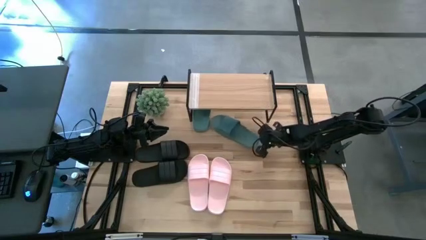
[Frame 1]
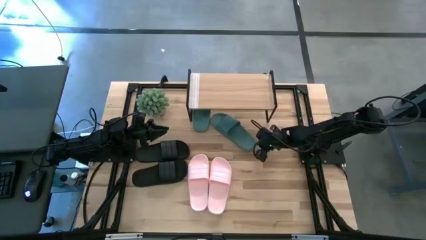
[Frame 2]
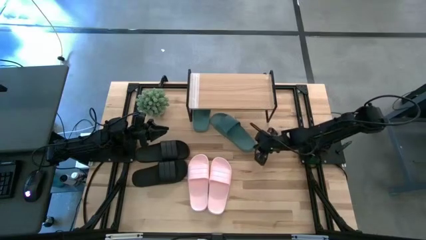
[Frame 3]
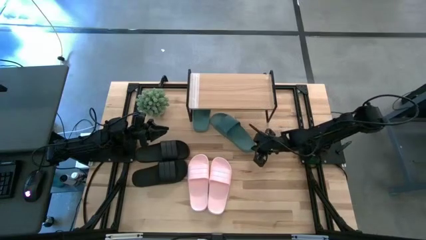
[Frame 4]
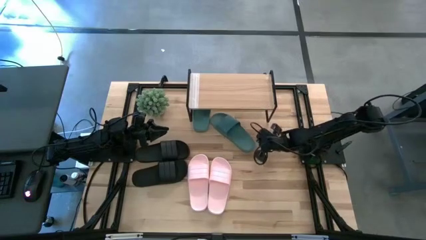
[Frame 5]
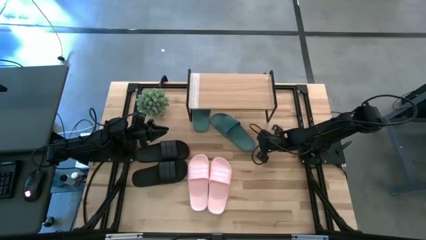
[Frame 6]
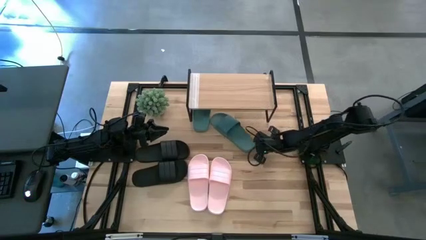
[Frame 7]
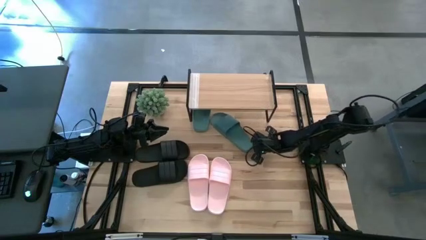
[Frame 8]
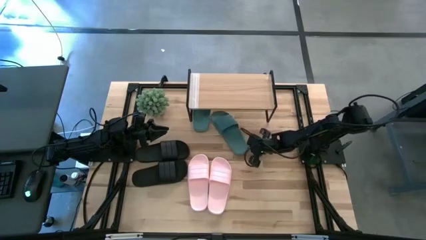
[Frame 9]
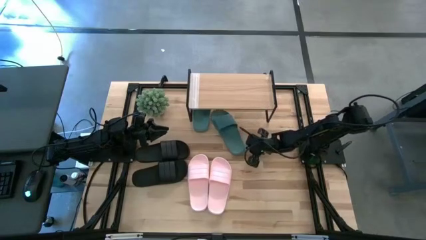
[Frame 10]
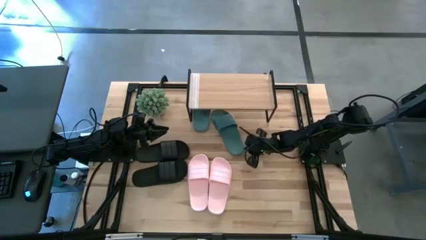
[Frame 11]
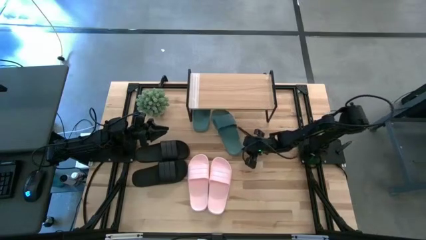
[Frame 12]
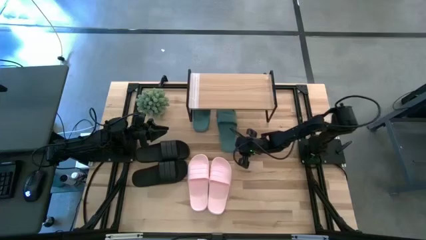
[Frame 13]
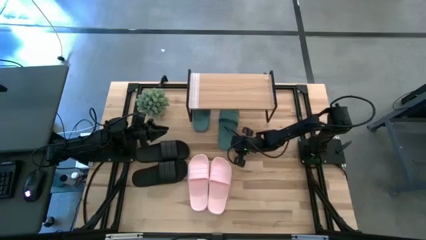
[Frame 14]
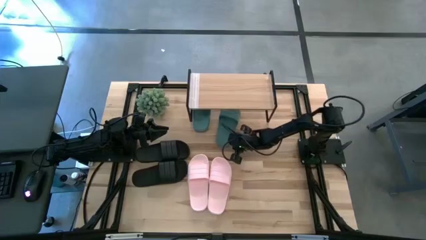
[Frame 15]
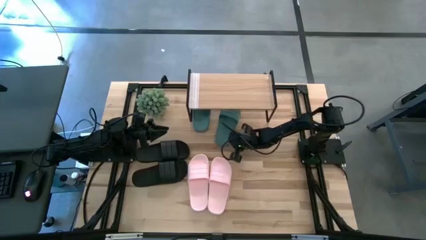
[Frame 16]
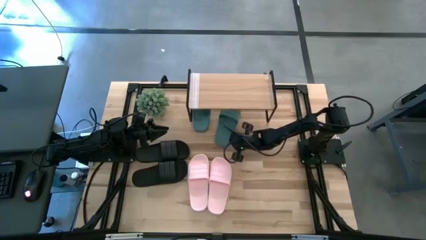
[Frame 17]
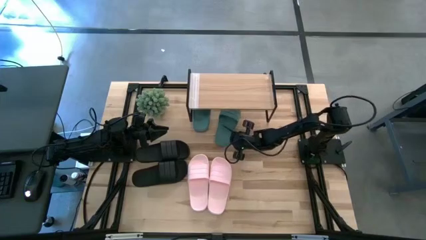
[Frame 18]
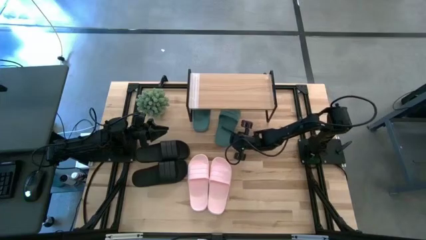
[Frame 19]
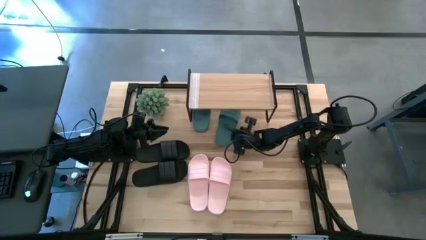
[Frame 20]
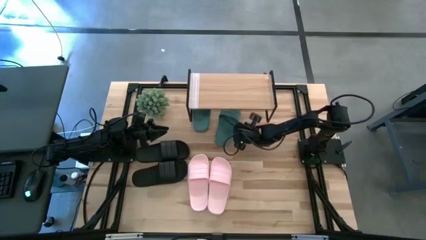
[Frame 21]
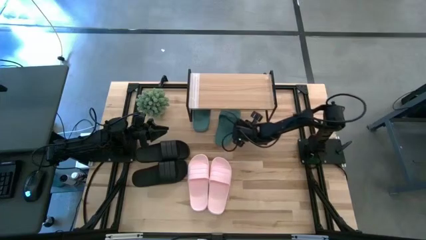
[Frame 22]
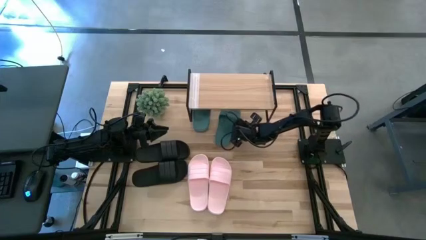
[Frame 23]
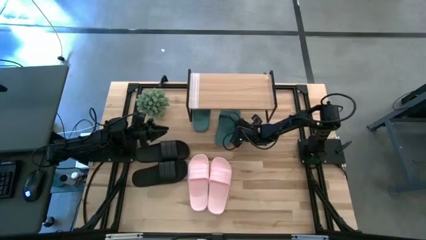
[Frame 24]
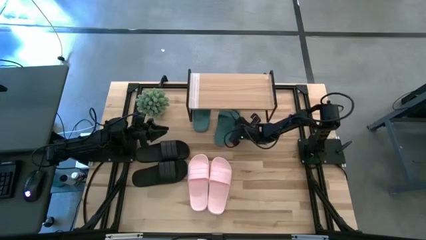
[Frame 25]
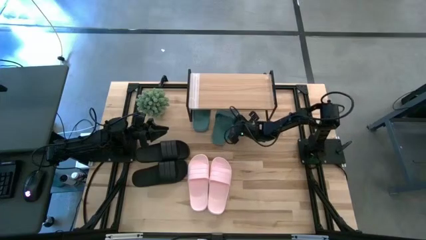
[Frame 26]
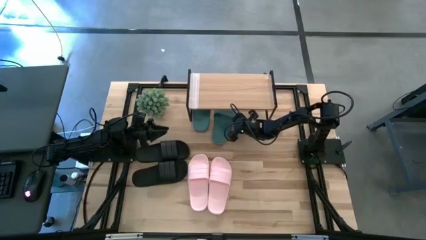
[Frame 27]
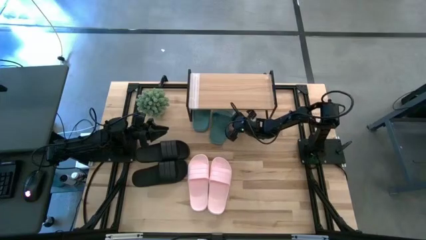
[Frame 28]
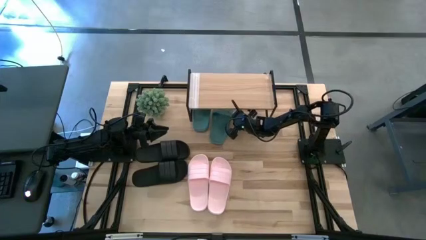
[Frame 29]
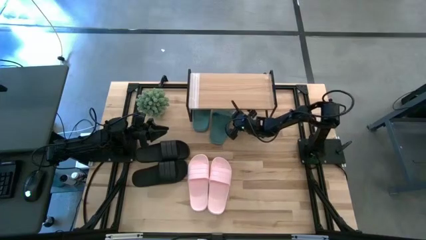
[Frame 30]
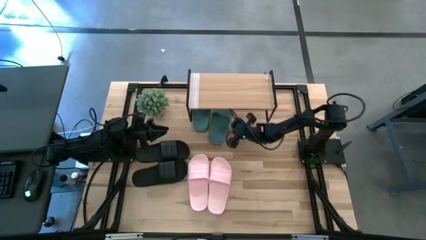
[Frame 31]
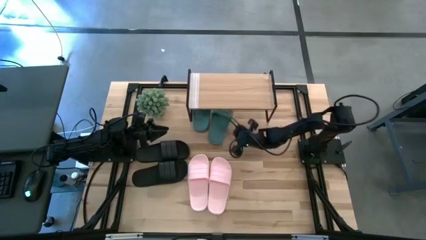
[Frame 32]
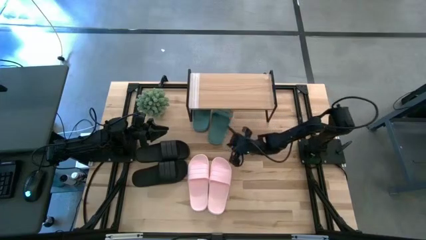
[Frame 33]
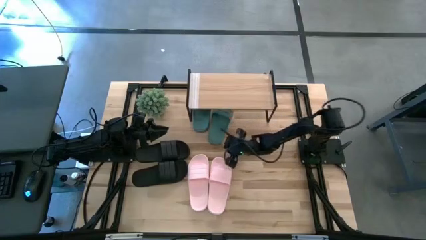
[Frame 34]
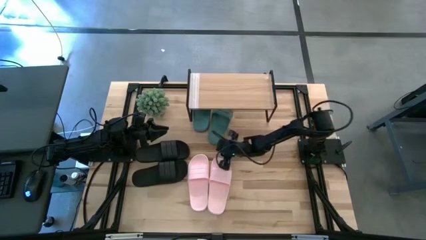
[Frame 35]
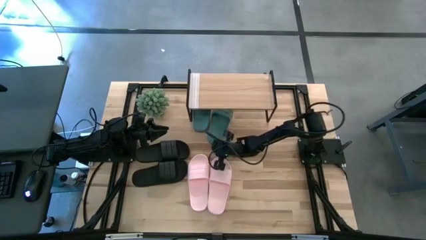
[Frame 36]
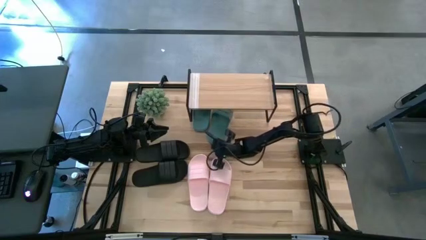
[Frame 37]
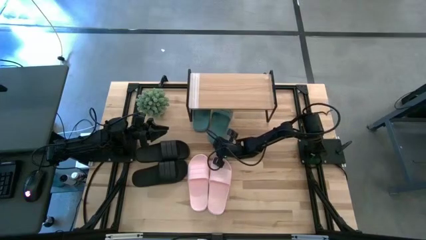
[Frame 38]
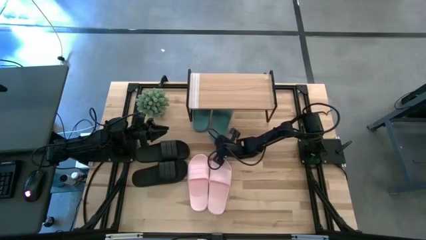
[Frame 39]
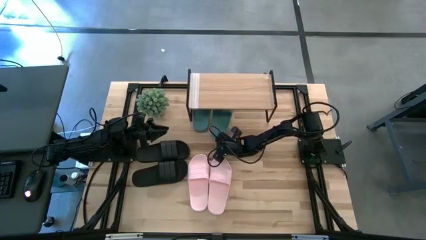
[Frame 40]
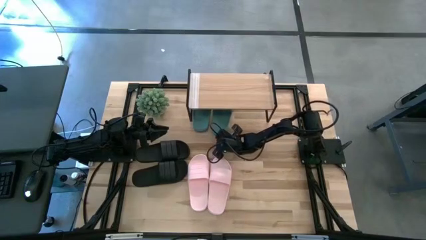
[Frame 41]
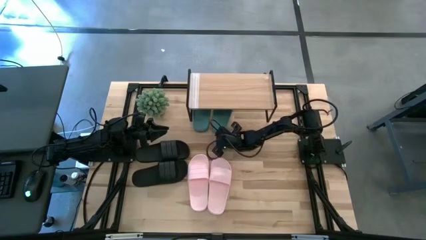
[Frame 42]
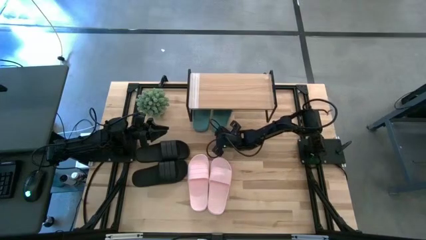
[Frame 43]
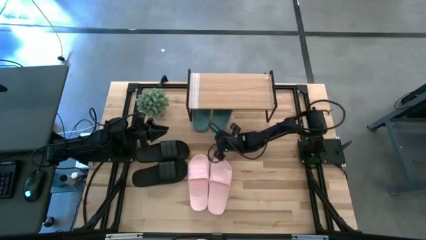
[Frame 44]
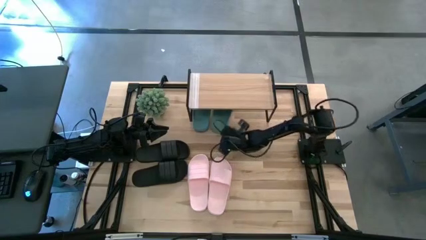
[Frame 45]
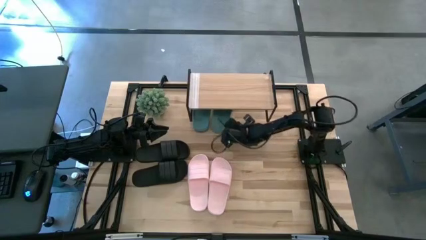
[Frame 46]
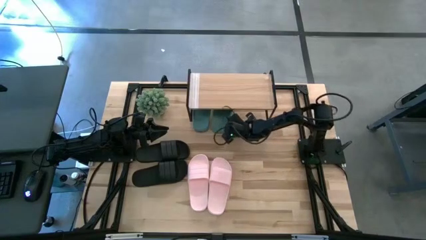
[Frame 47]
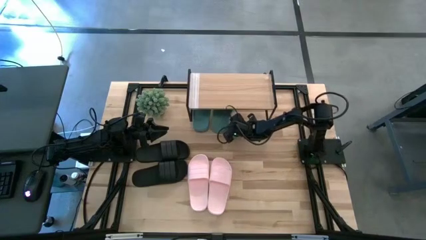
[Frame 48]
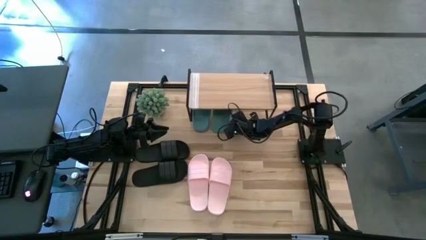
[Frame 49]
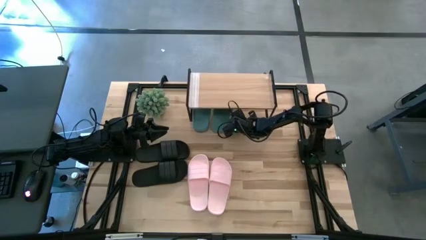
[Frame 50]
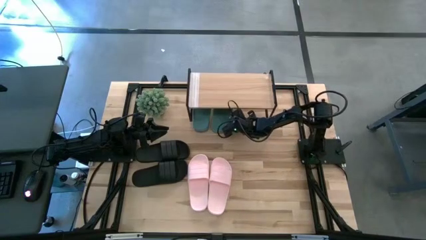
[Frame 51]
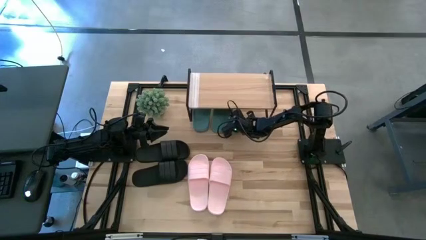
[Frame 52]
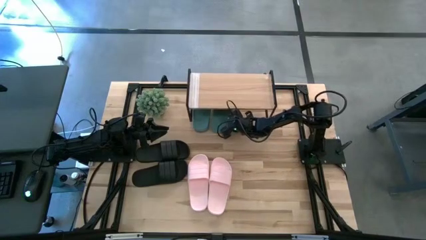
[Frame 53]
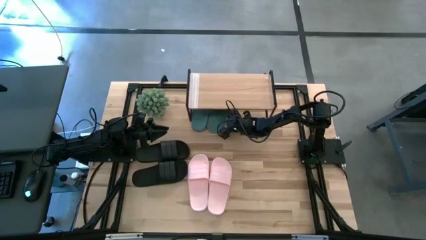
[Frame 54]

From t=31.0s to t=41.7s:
Task: Pick and place slides into the shelf
Put the green slides under the shelf
